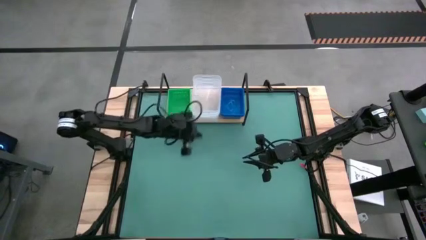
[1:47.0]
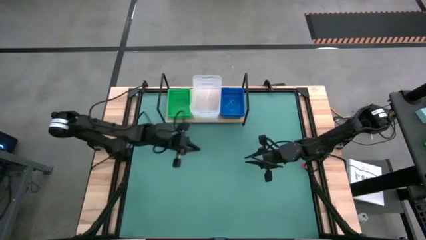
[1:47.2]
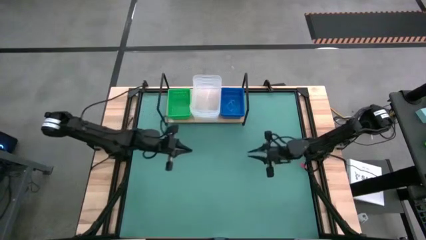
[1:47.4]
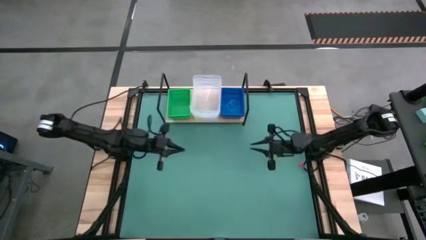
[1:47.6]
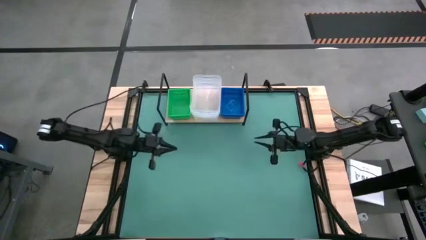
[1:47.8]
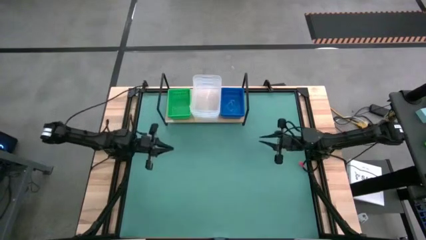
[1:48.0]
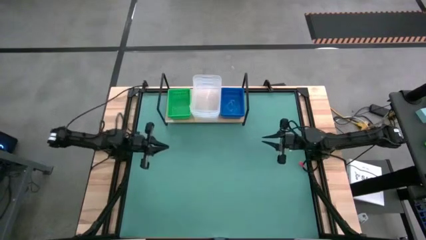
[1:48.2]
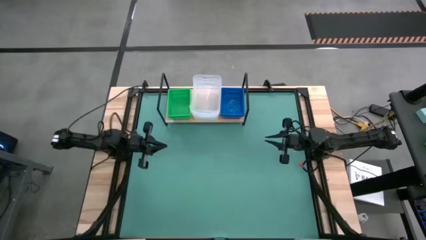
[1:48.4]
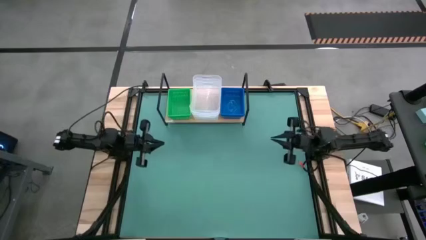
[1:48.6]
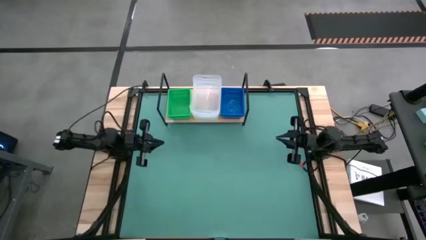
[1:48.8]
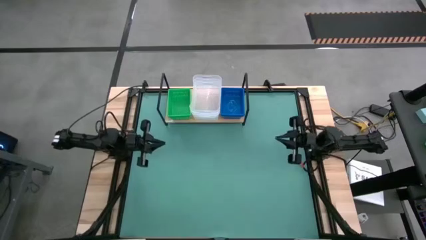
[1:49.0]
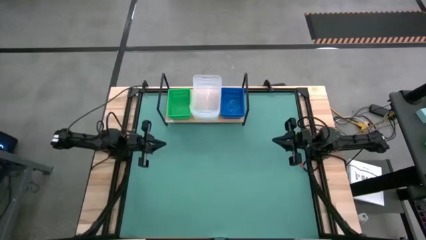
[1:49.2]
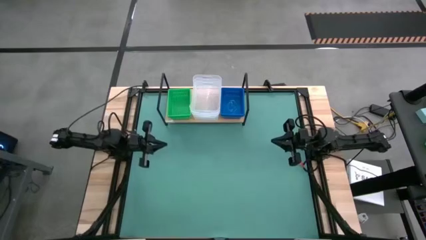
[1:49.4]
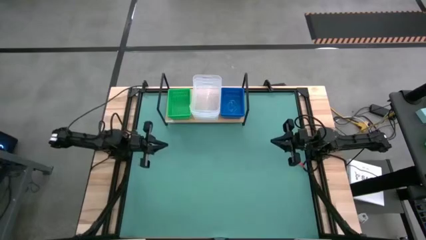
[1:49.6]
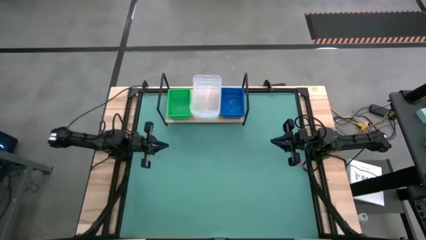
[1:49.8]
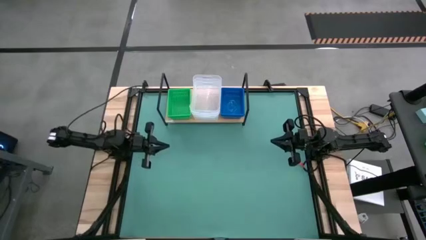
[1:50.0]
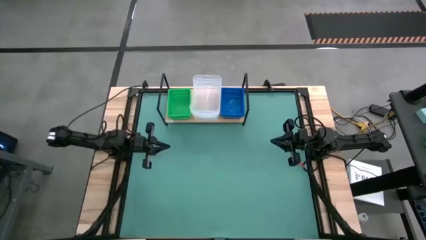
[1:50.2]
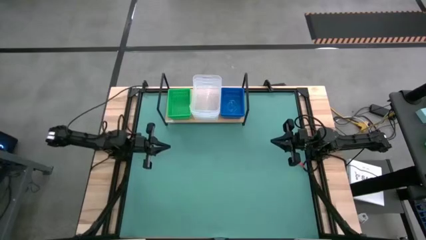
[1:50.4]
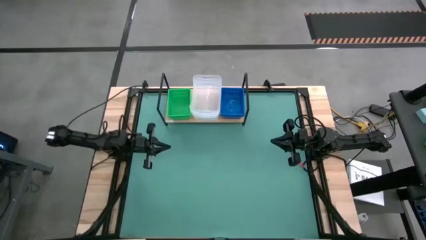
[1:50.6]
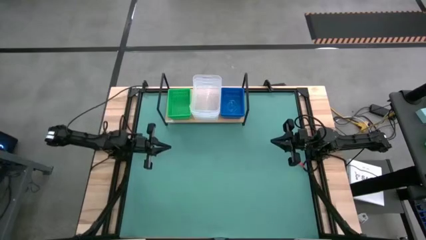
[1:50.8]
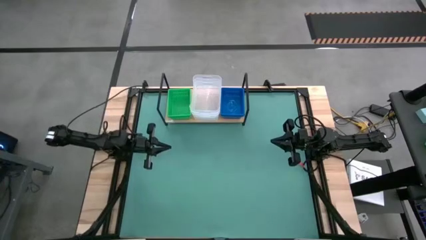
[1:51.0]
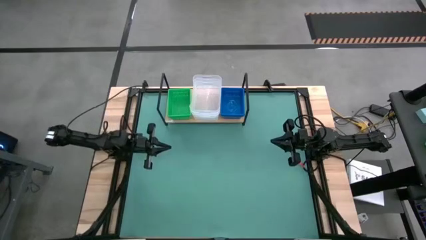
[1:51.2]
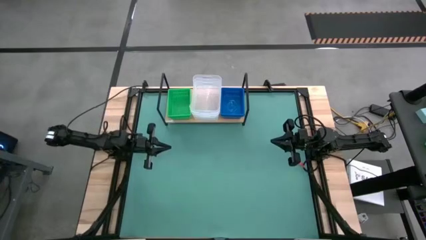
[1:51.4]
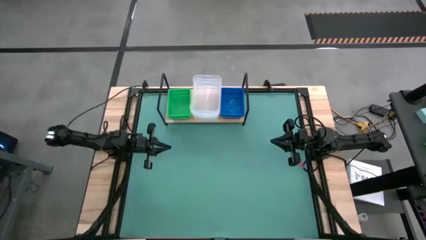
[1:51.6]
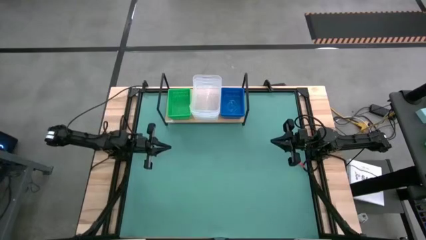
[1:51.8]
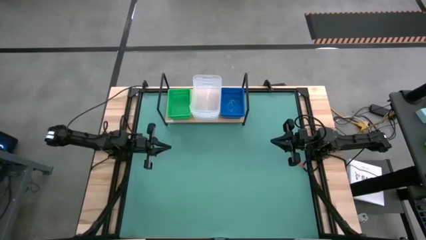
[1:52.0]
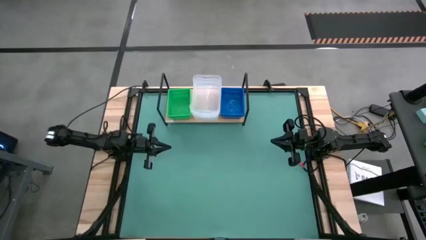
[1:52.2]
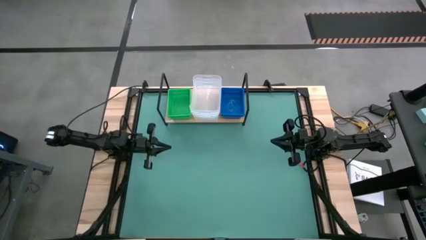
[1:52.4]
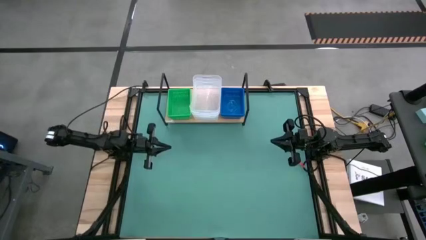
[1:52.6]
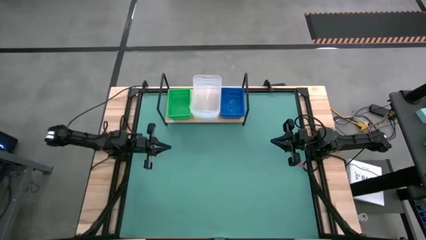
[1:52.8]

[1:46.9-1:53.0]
Task: Stack baskets on shelf by color
Return to Home Position

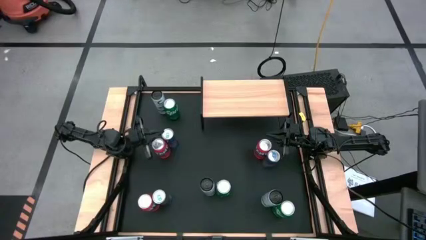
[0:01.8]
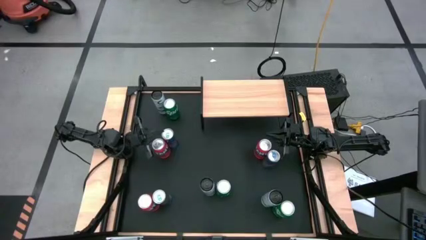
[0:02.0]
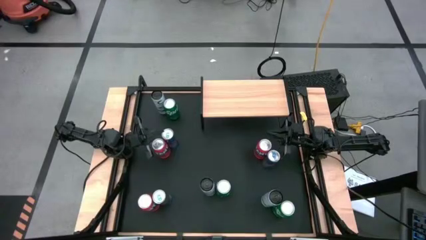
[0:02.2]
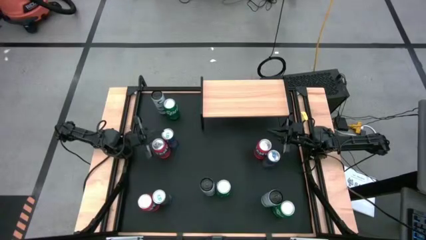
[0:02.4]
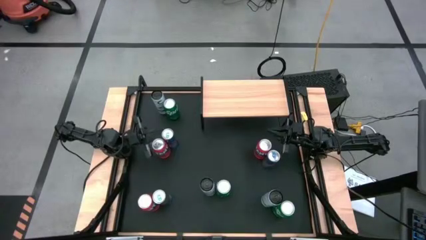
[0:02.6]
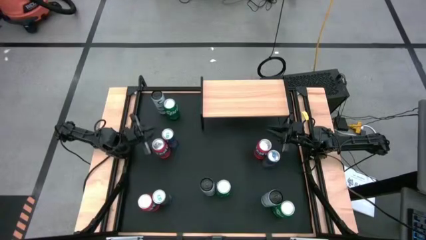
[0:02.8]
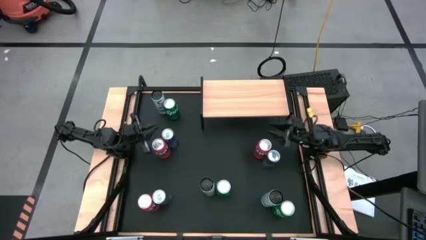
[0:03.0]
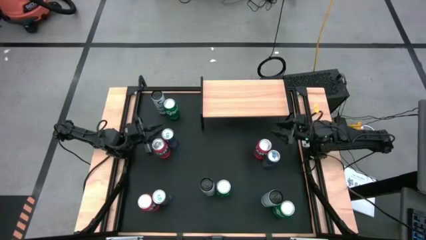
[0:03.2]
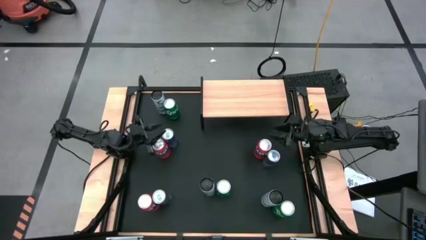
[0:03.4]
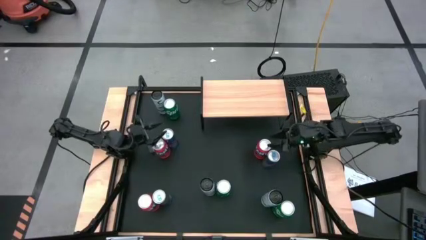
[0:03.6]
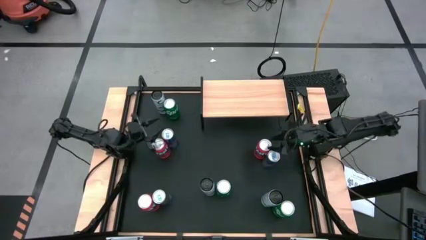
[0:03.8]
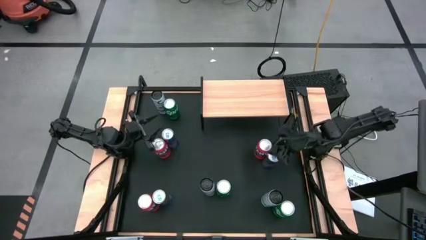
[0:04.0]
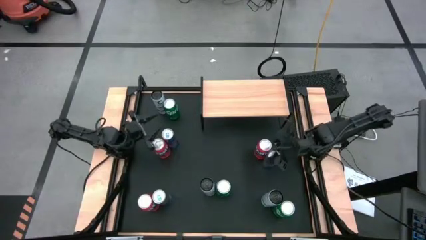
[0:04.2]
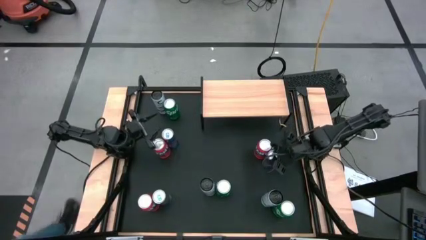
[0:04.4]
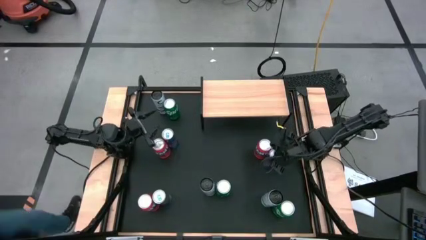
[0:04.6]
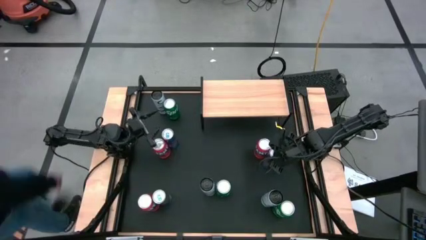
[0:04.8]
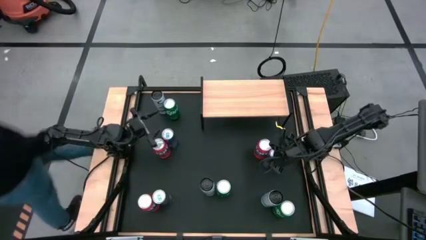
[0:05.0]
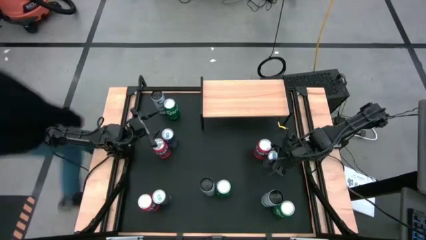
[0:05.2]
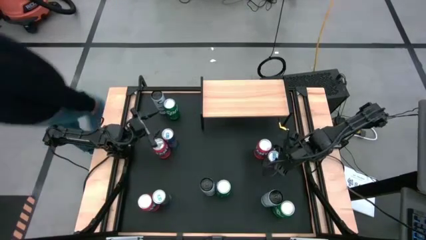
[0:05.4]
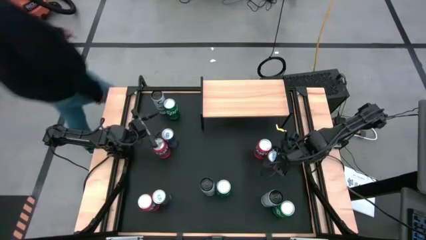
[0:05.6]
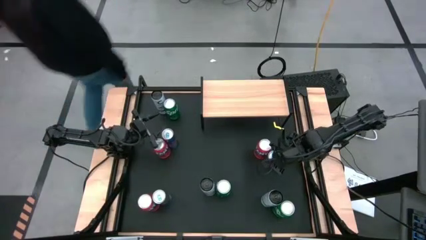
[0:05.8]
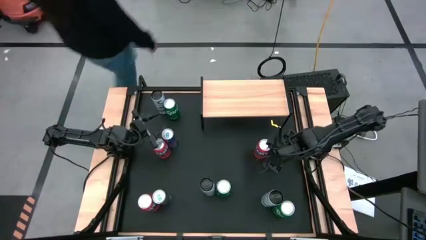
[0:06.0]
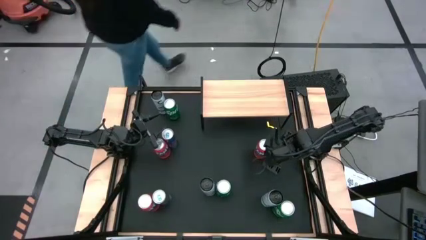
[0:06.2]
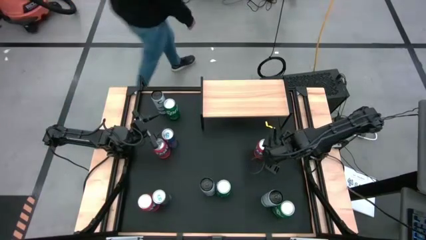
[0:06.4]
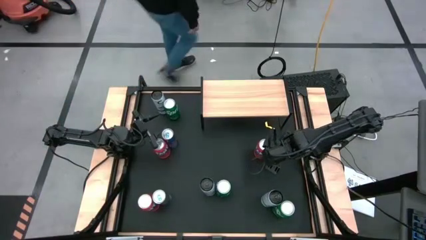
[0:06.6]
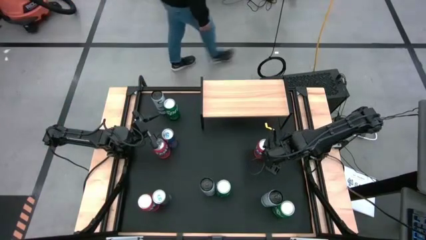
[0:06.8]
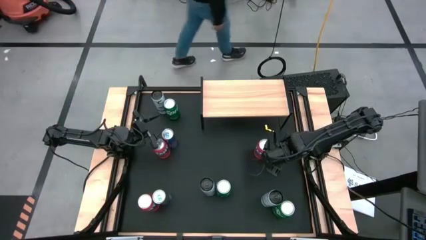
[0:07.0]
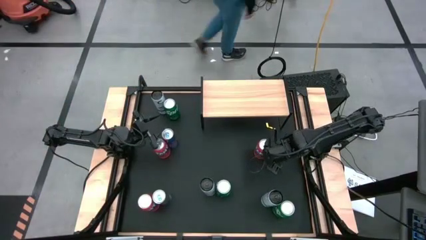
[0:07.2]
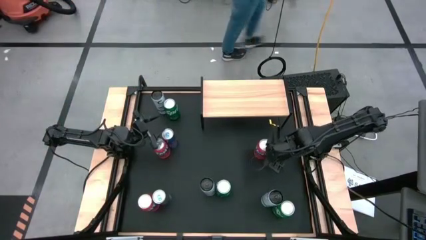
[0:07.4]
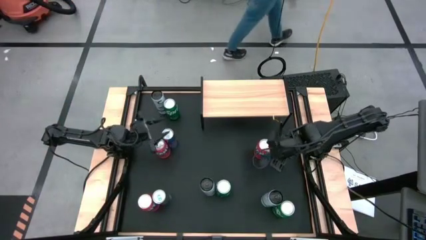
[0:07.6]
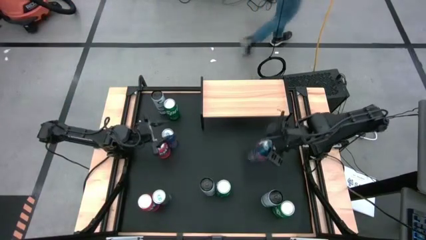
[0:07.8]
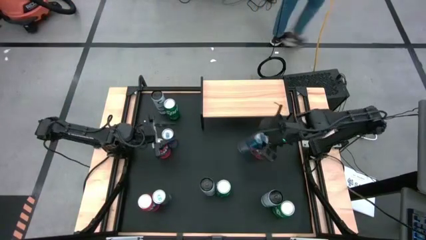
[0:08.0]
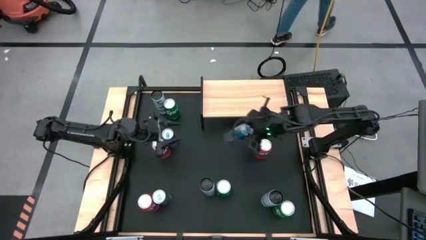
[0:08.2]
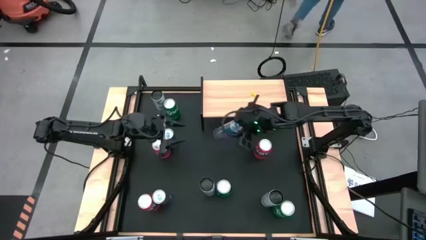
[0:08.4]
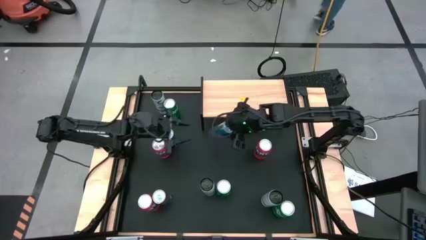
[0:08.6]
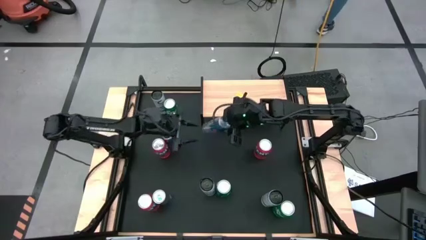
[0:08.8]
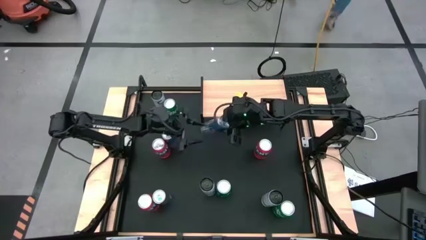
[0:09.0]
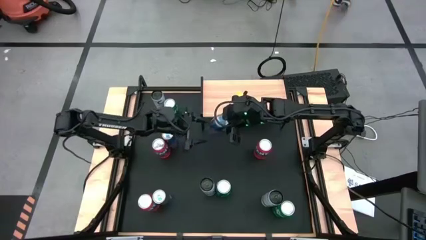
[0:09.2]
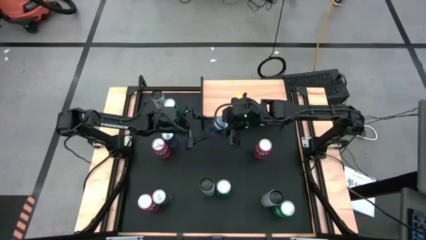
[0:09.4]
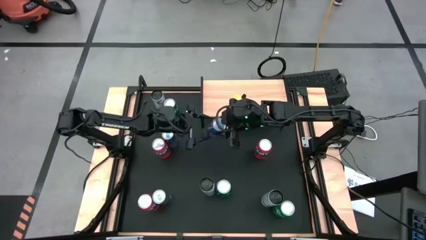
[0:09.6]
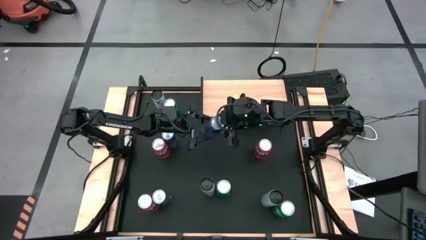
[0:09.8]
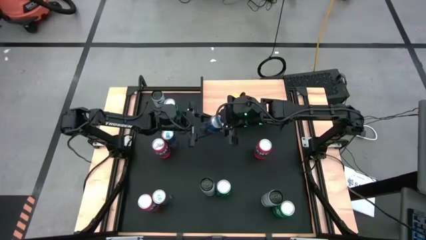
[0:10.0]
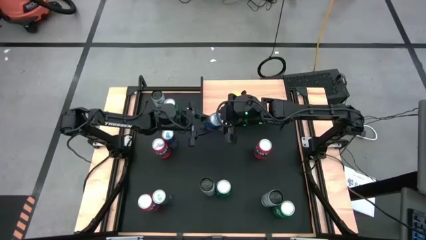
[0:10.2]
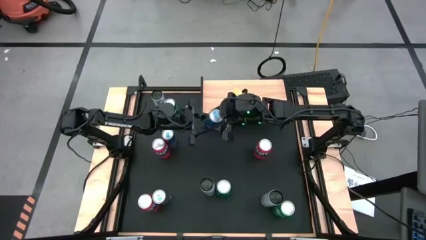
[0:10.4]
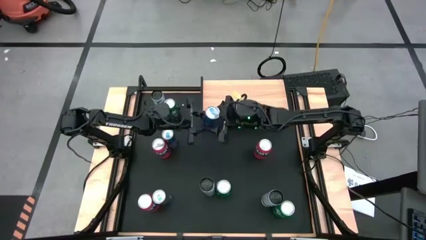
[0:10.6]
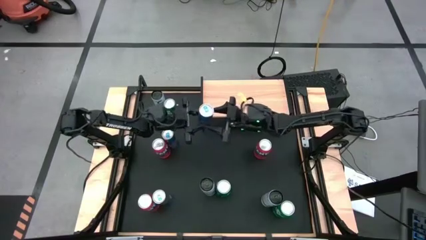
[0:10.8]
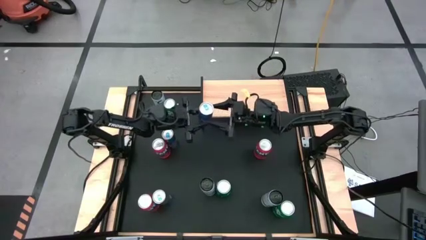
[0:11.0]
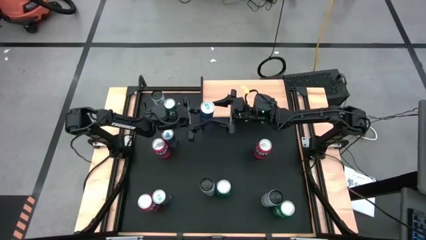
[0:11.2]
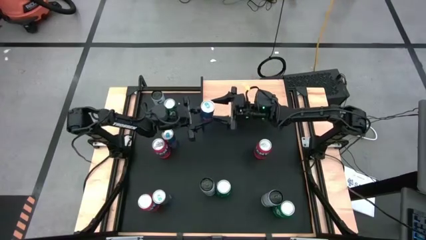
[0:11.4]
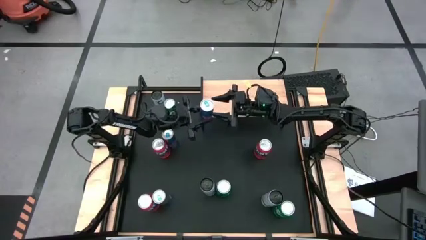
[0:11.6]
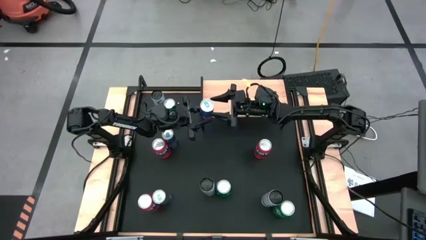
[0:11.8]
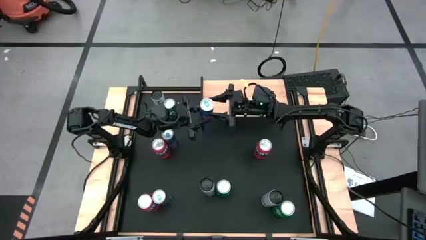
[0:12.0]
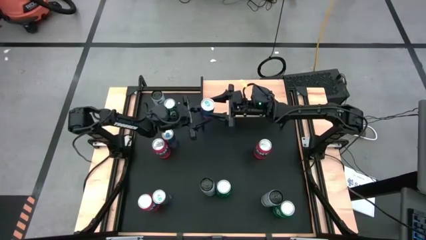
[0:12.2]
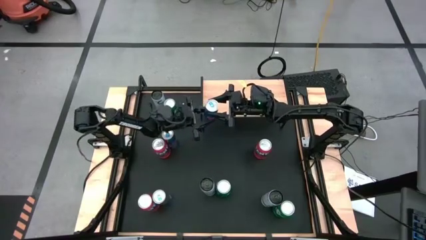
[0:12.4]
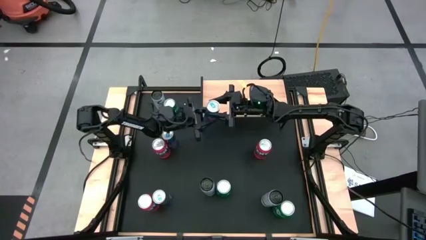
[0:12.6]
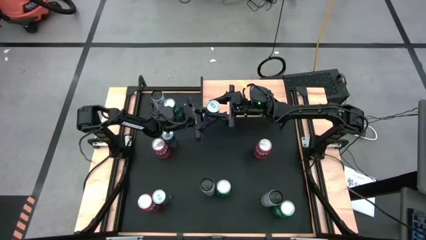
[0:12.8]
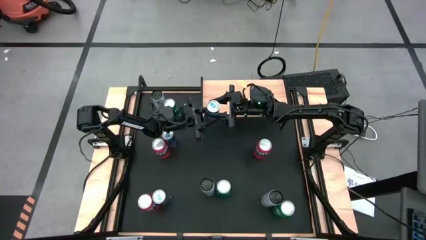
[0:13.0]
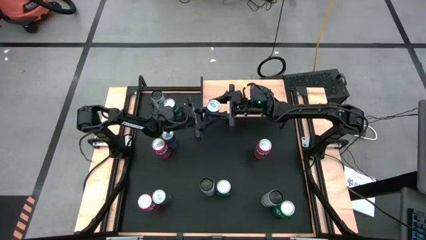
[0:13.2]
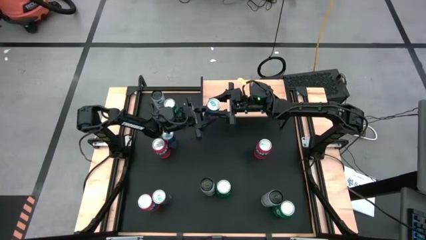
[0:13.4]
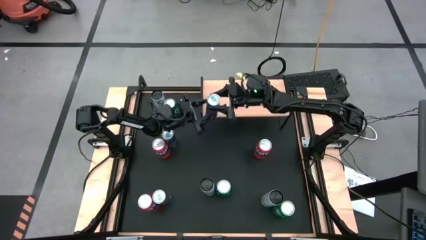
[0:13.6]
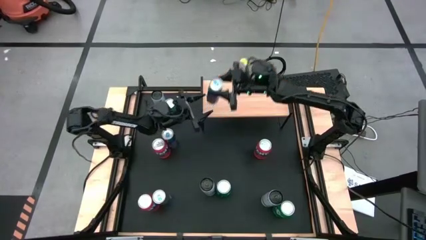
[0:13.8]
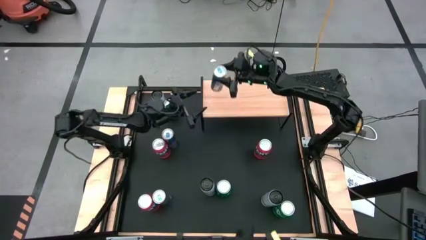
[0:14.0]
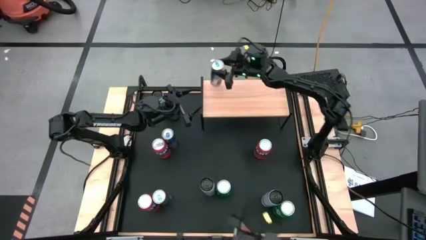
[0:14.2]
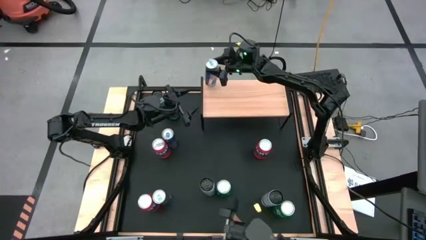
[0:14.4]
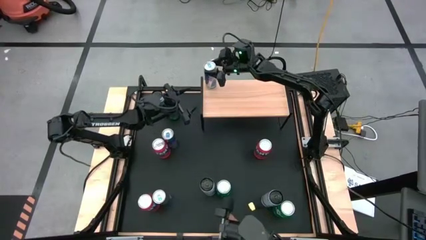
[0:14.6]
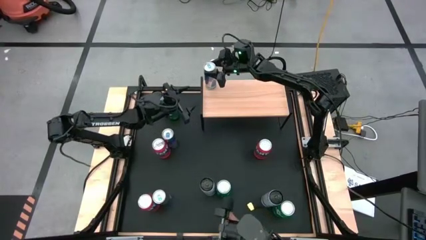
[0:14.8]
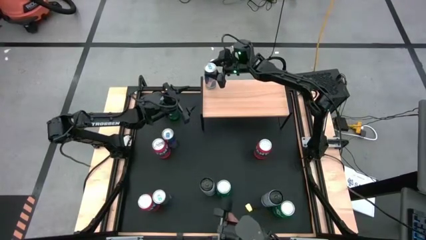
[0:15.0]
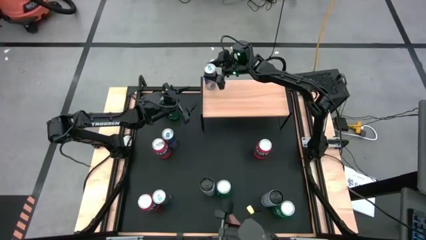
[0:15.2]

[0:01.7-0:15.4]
Task: Place canned beverage on shelf
Put the bottom left blue soda can on the shelf
